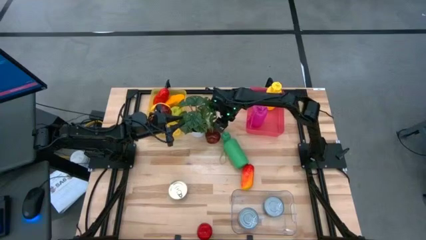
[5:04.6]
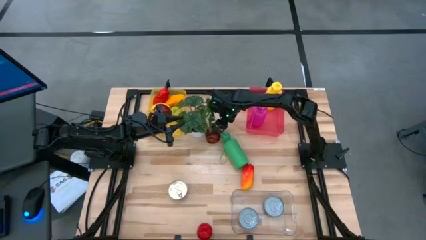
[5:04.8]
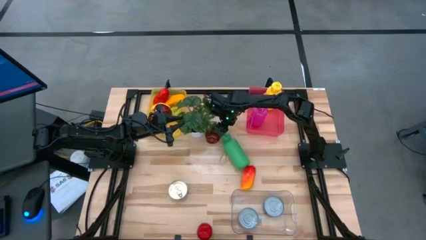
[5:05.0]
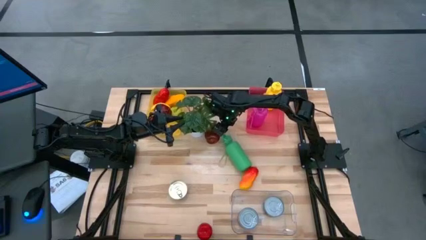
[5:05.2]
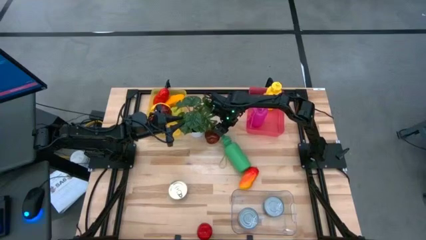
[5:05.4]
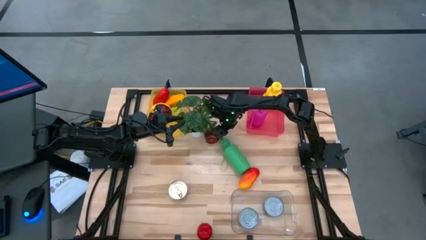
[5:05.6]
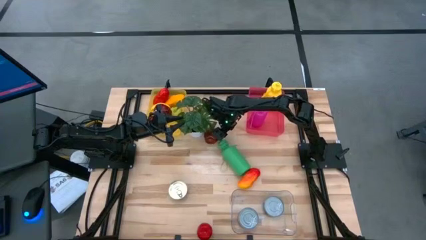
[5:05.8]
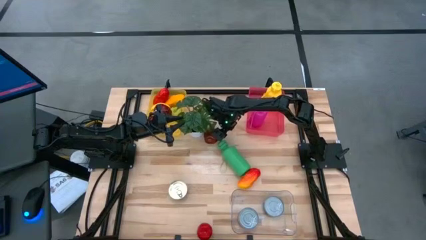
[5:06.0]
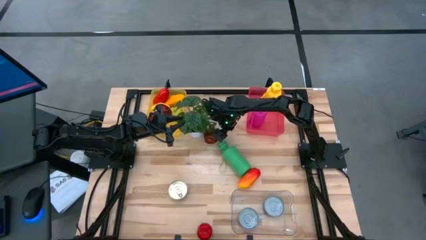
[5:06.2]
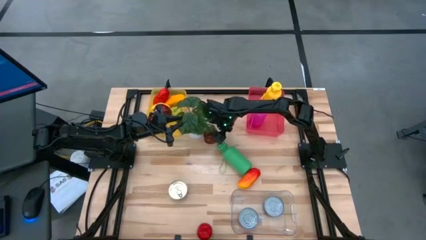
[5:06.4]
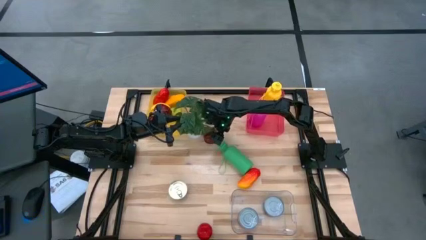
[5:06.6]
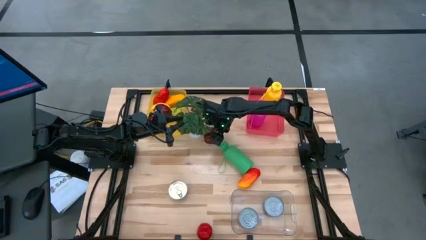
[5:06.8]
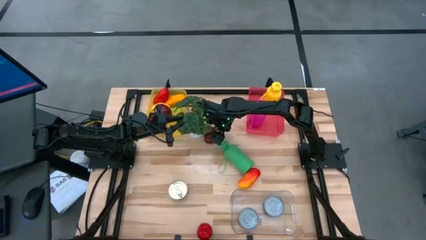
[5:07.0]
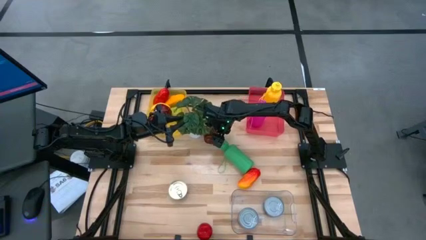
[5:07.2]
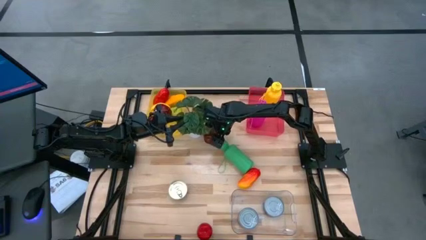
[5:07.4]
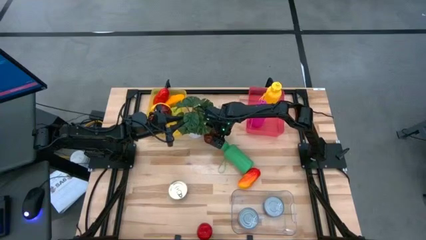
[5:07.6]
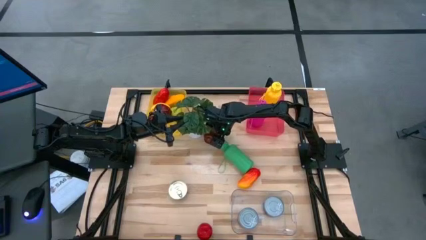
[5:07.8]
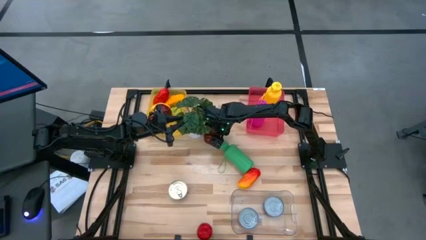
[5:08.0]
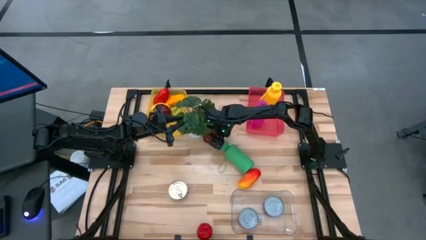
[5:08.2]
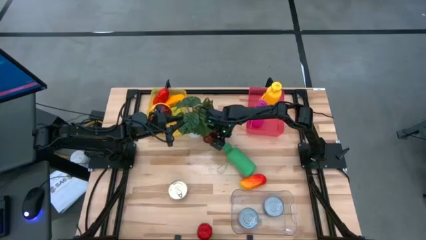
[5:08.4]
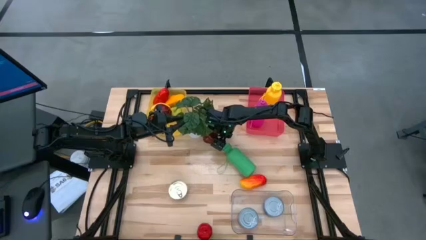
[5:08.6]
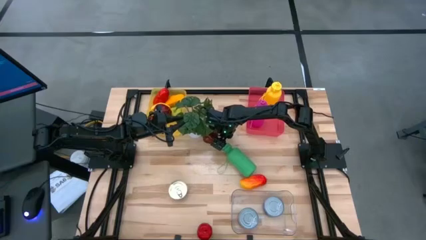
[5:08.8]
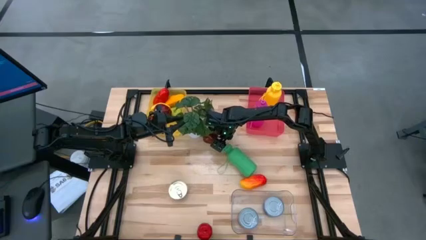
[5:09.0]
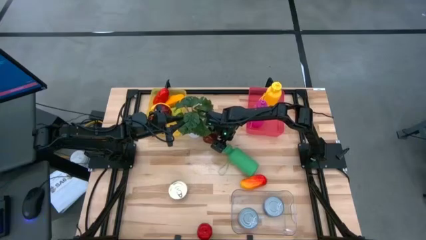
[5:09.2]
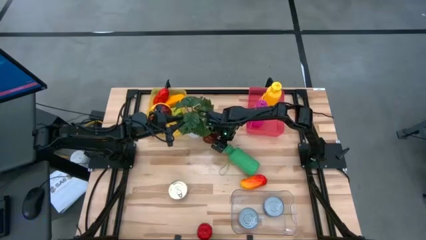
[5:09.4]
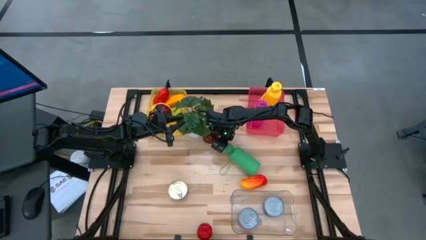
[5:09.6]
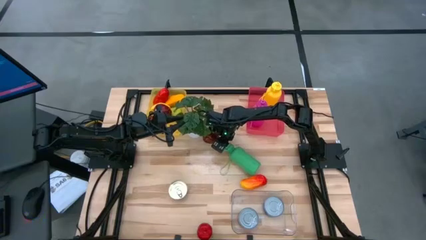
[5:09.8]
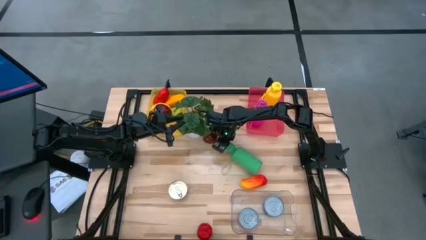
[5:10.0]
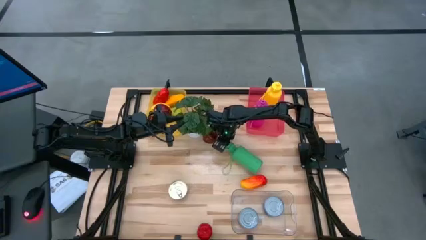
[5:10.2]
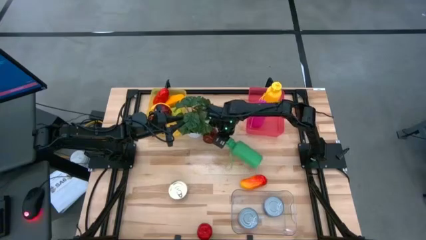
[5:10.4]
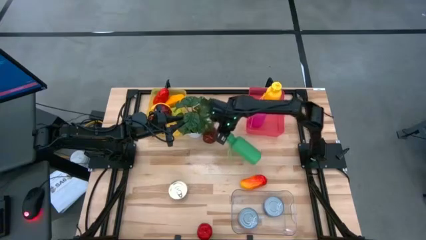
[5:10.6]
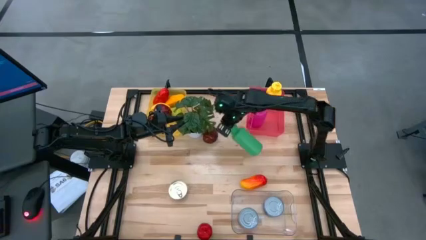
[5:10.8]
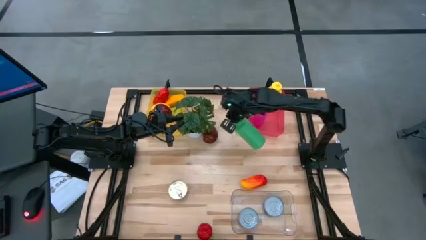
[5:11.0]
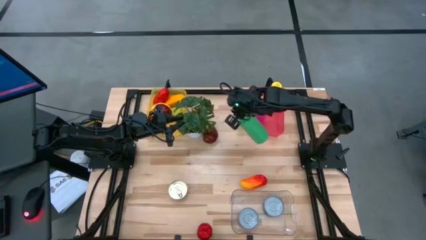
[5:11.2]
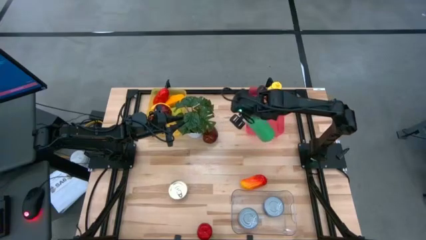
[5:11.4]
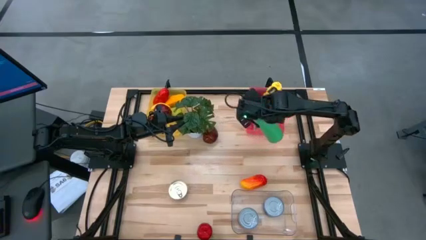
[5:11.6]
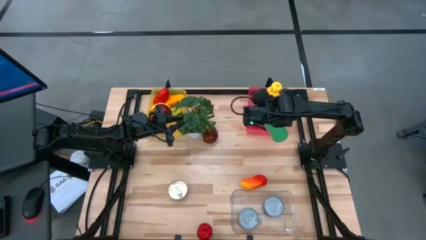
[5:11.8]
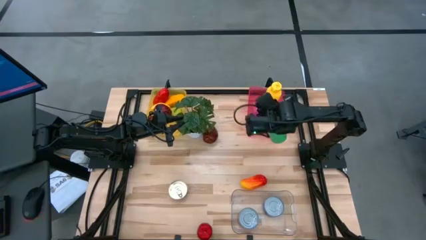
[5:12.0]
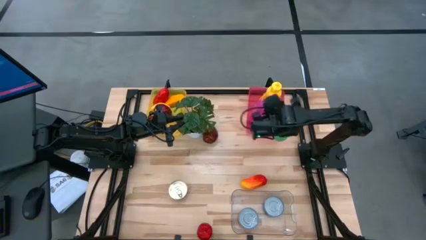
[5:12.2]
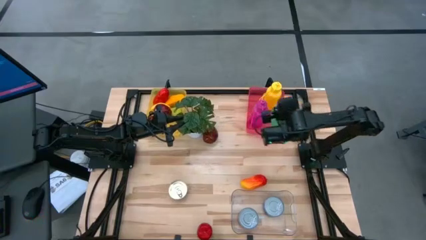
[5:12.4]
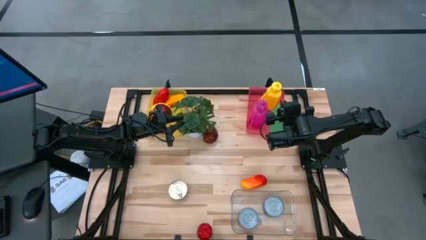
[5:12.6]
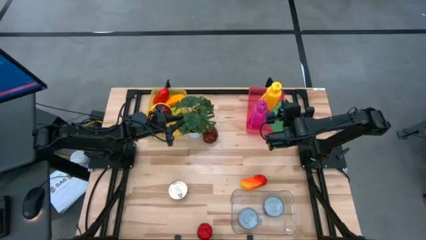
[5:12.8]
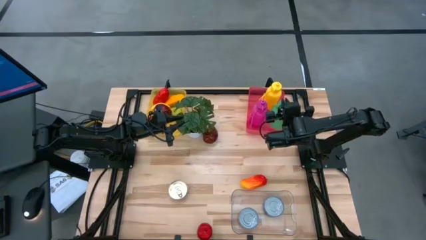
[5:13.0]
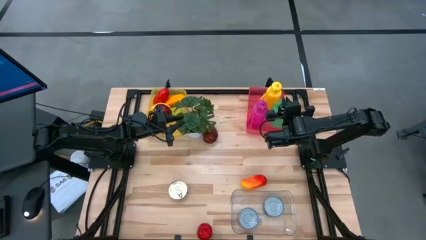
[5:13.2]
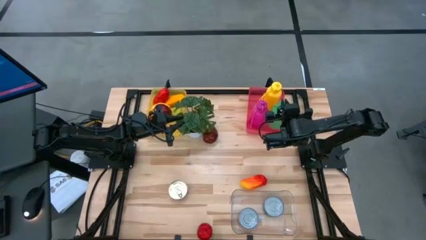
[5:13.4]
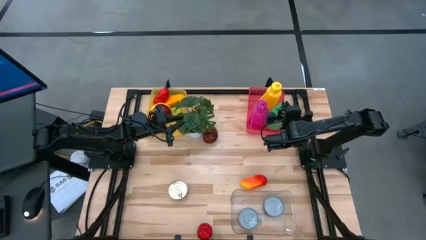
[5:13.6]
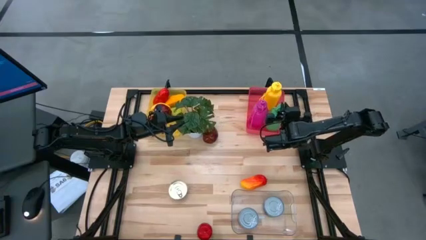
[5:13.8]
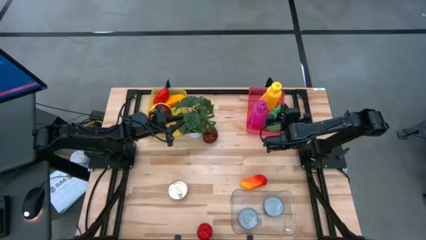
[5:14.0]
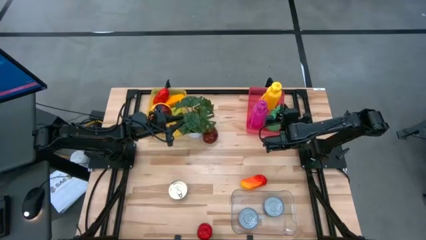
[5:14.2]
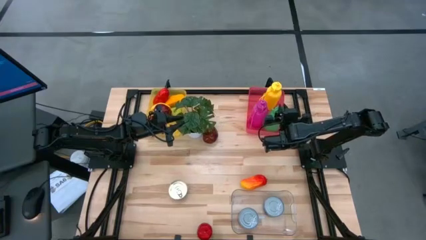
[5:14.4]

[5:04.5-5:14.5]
Task: Pick & Place Food Item
Put the green water bottle into the pink bin

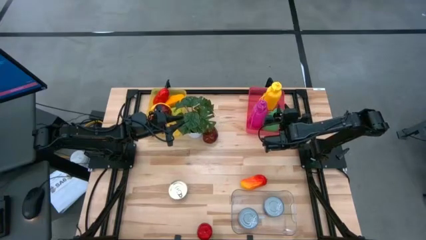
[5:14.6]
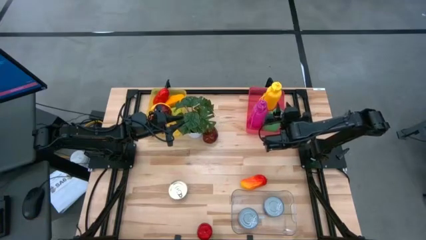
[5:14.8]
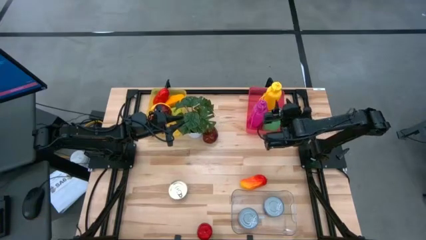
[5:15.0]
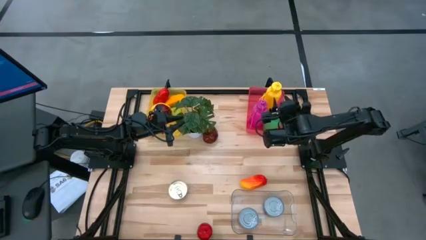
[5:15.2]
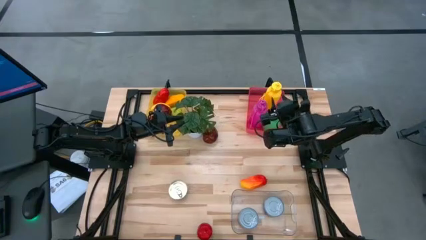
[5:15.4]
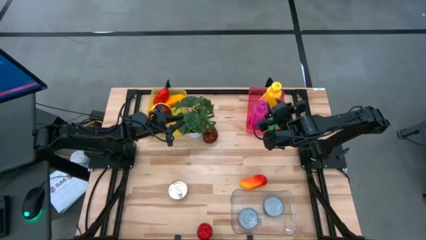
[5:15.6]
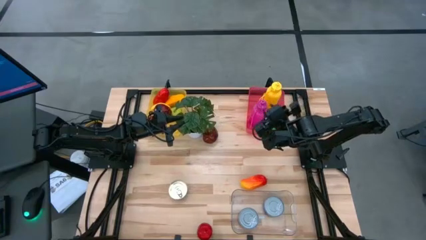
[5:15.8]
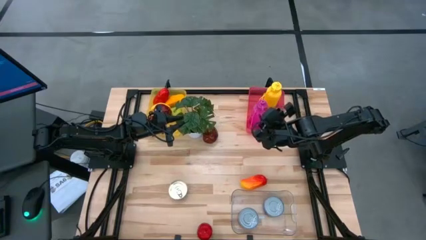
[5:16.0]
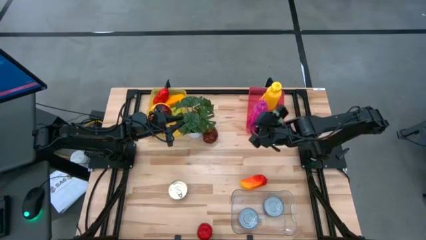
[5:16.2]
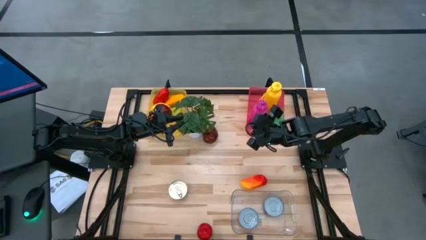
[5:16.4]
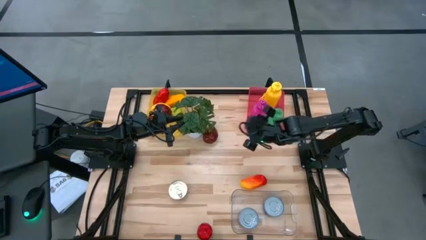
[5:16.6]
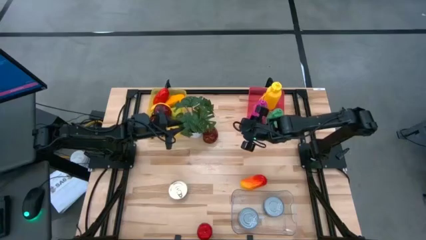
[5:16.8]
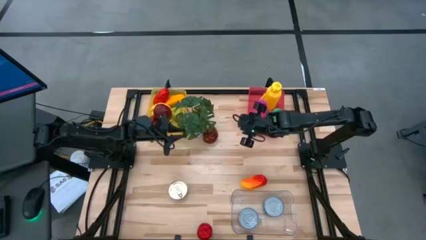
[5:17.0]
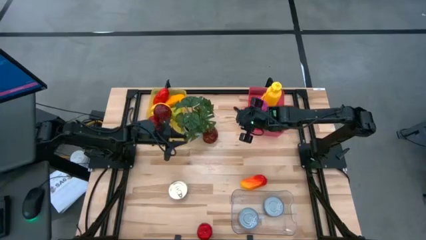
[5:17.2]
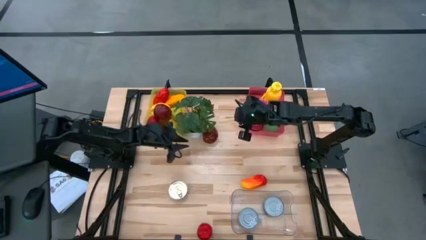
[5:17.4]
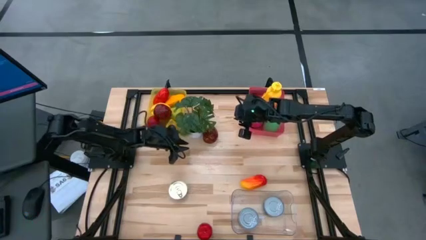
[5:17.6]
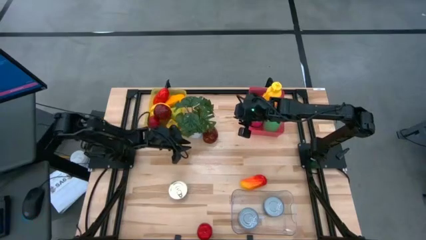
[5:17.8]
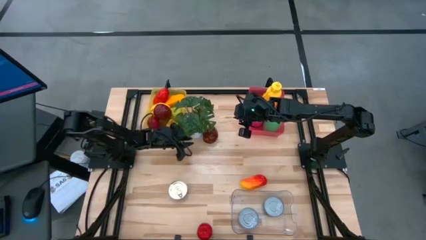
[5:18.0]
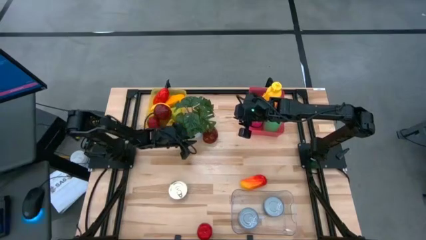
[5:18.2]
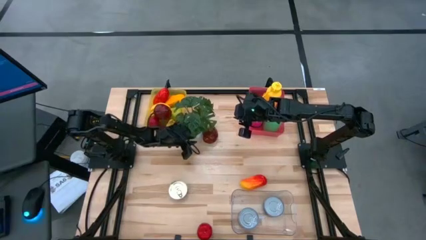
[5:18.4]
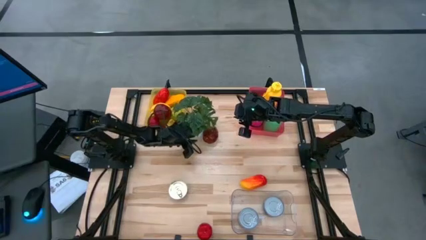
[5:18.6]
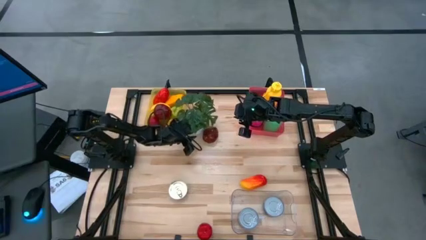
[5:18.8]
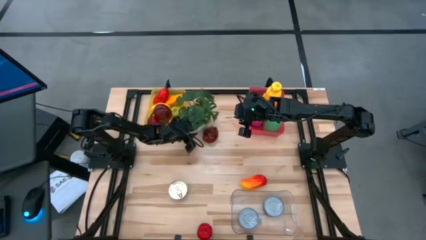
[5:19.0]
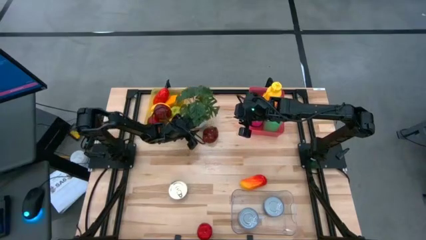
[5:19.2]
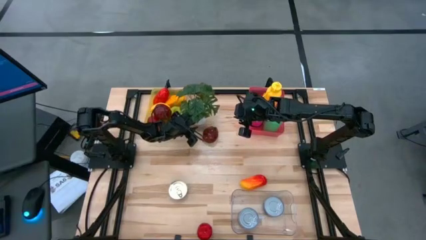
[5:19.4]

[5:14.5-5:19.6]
Adjust the white potted plant

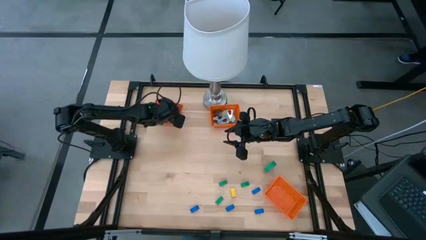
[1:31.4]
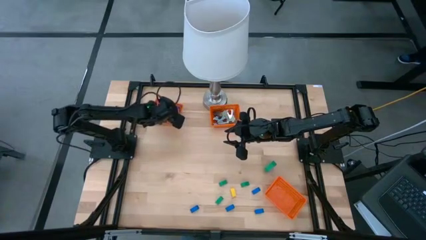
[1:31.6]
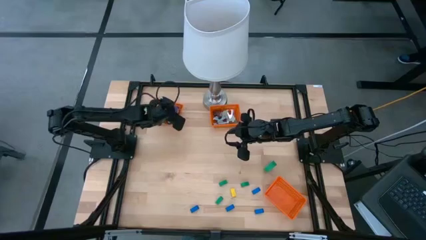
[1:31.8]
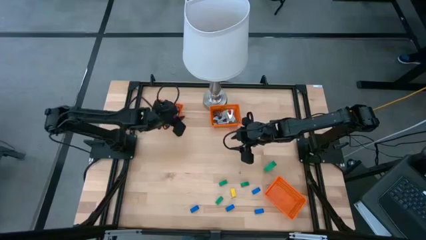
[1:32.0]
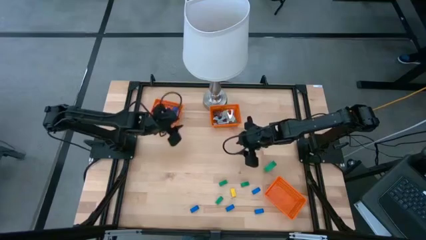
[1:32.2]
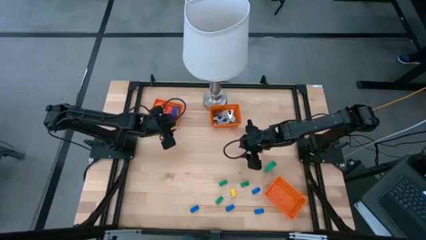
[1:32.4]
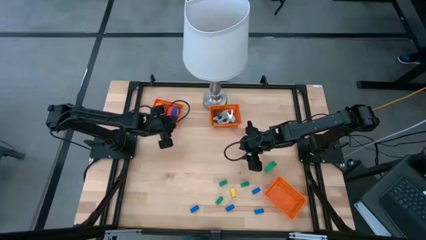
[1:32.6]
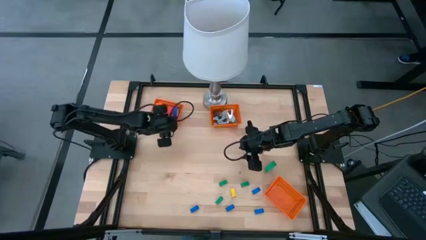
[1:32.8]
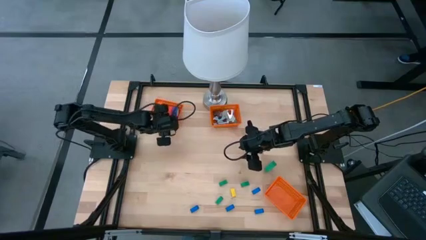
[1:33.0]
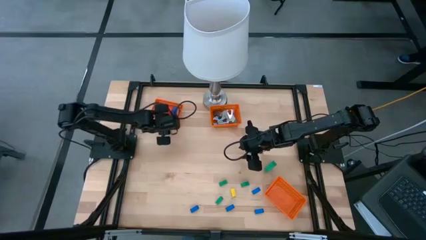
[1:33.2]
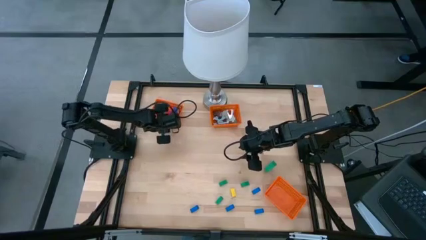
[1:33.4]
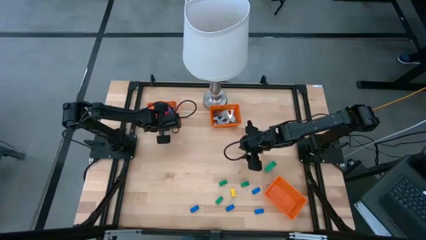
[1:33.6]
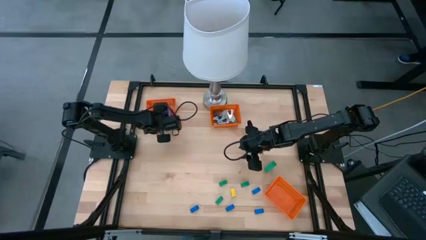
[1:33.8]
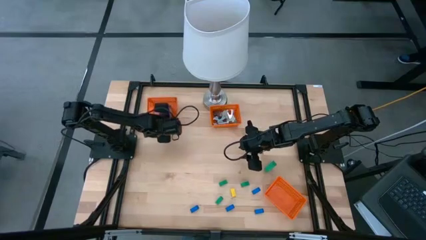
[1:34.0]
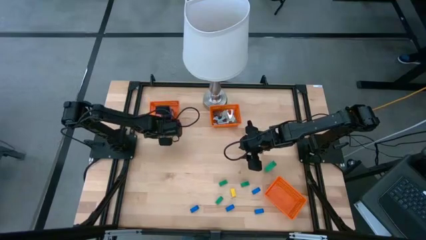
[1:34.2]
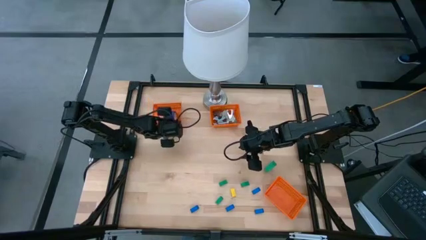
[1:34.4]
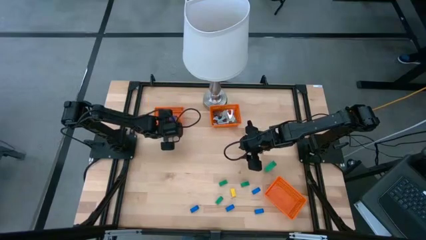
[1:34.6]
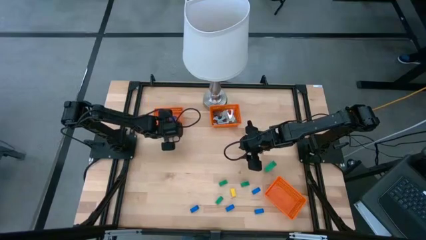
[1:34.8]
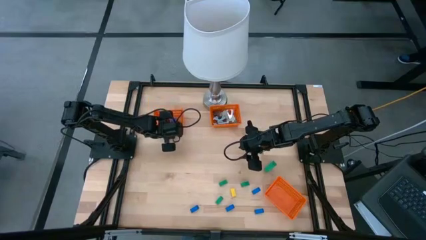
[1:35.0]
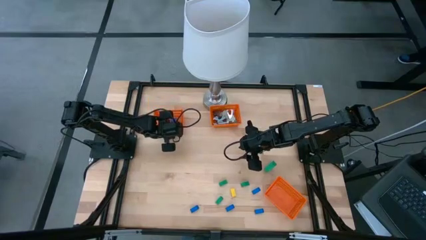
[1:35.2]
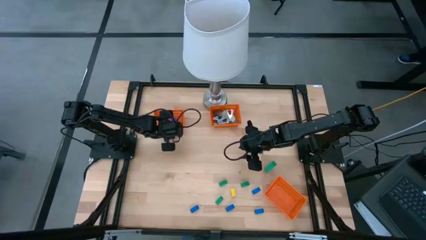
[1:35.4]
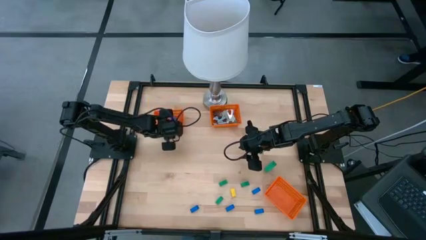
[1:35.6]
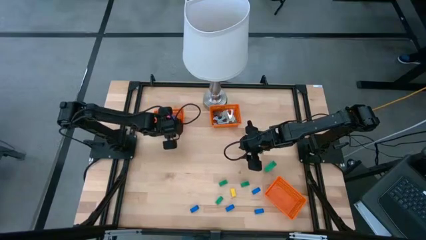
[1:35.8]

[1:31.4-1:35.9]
Task: Pick and place Stapler, Stapler remover, tape
Adjust the top left orange bin
